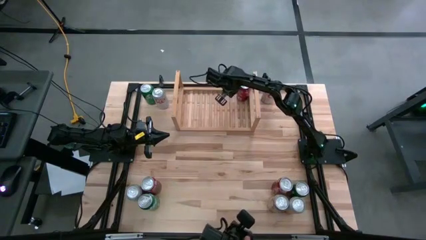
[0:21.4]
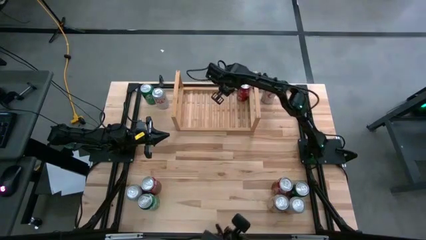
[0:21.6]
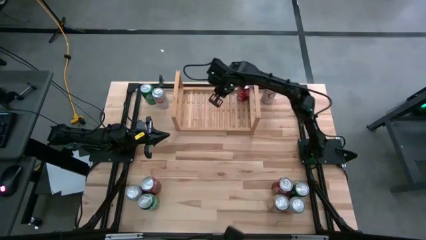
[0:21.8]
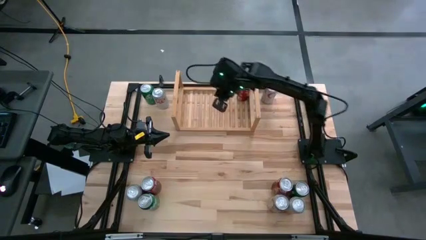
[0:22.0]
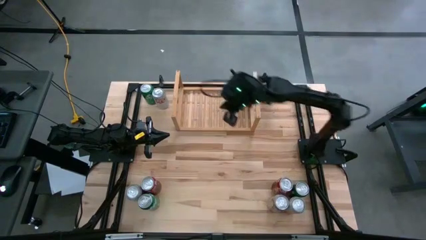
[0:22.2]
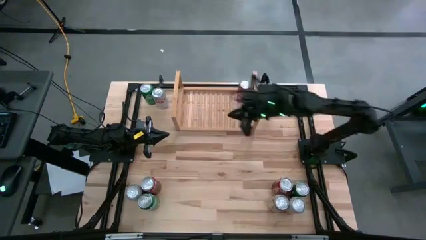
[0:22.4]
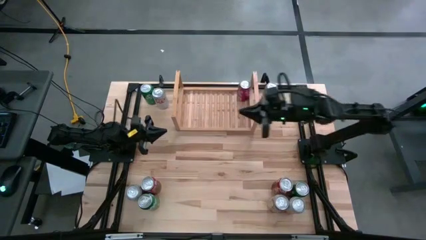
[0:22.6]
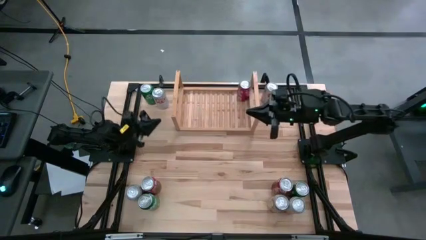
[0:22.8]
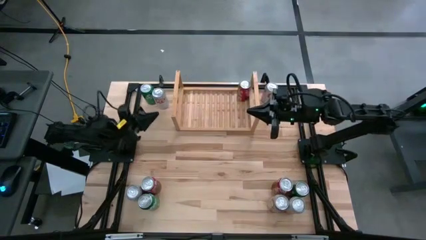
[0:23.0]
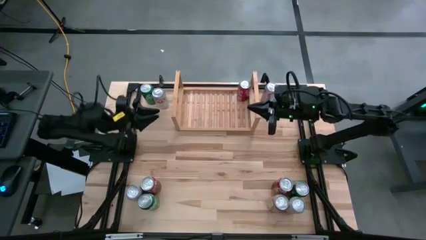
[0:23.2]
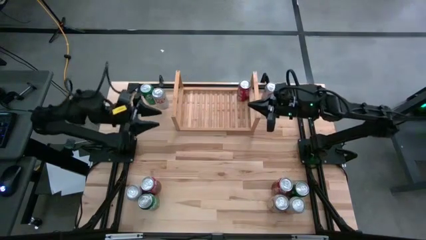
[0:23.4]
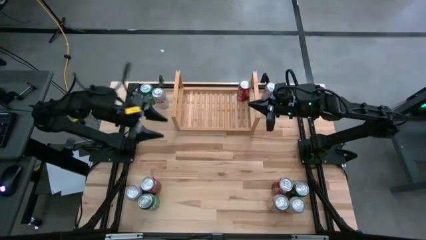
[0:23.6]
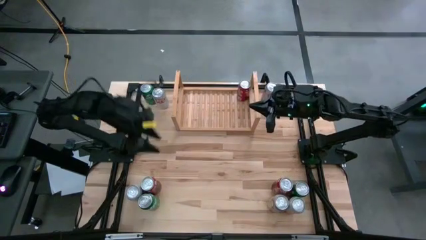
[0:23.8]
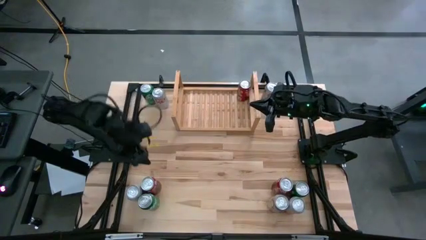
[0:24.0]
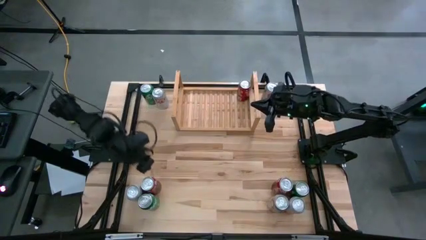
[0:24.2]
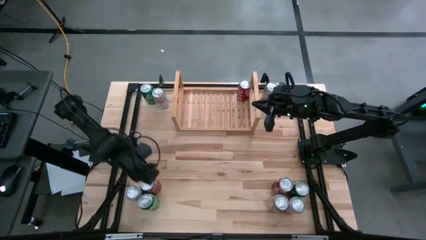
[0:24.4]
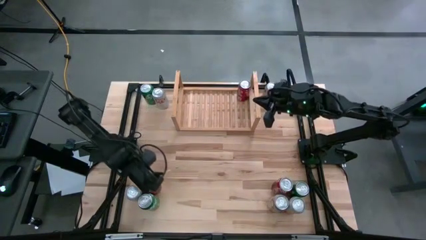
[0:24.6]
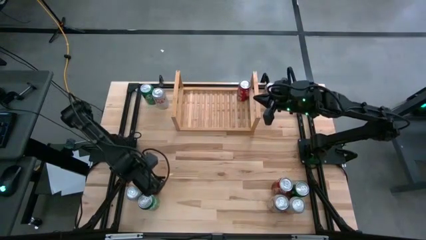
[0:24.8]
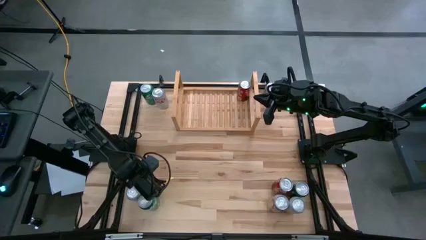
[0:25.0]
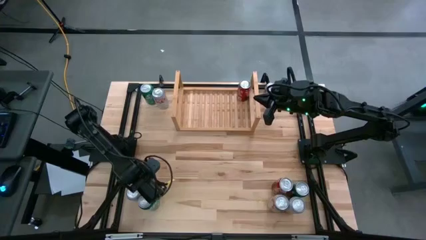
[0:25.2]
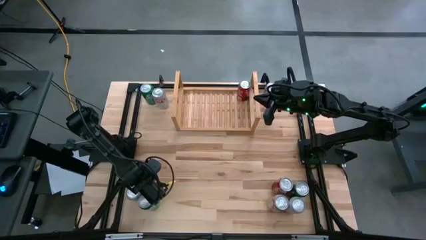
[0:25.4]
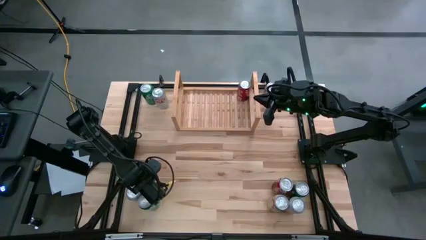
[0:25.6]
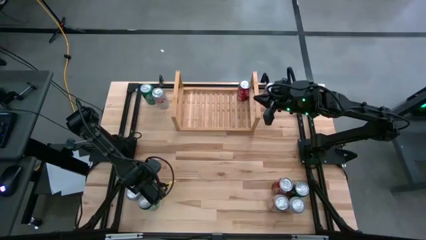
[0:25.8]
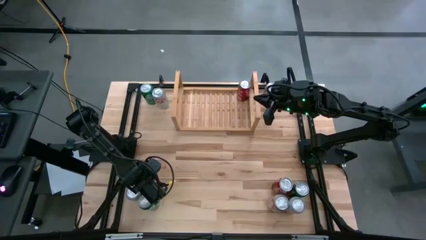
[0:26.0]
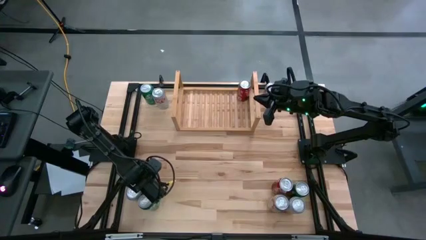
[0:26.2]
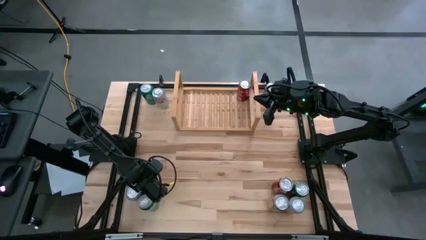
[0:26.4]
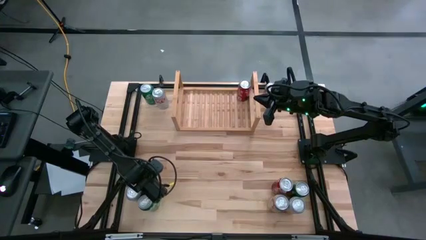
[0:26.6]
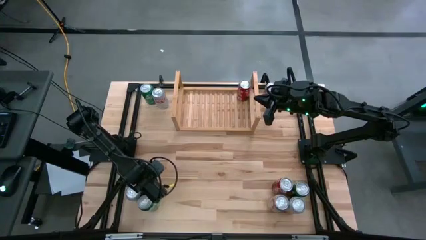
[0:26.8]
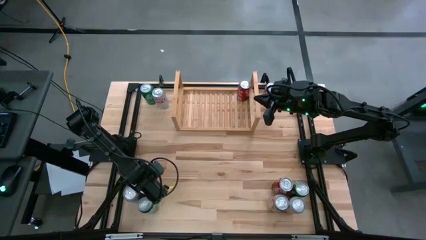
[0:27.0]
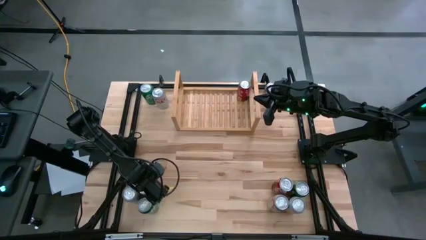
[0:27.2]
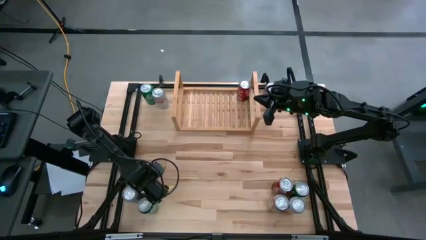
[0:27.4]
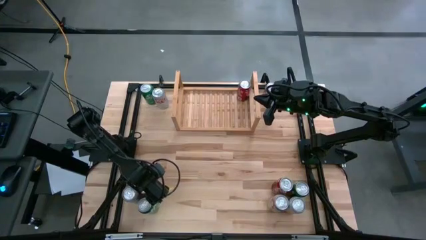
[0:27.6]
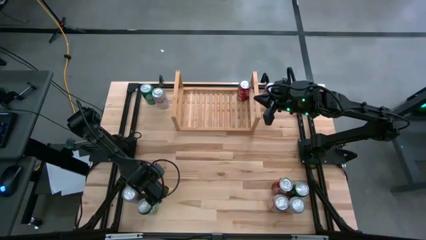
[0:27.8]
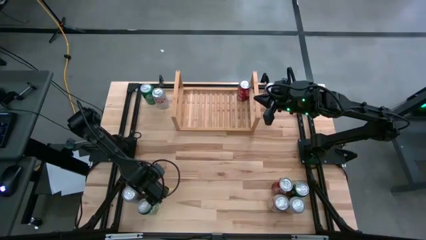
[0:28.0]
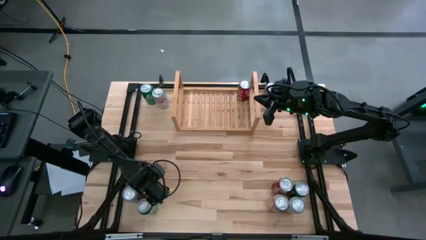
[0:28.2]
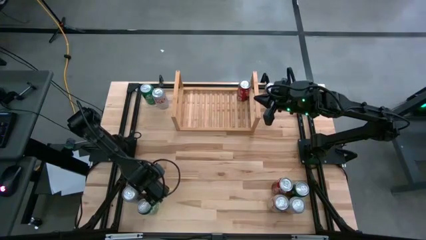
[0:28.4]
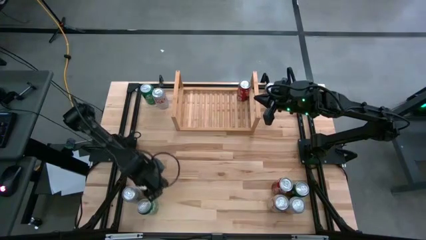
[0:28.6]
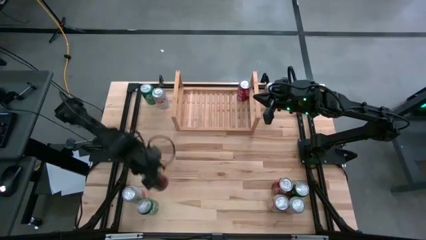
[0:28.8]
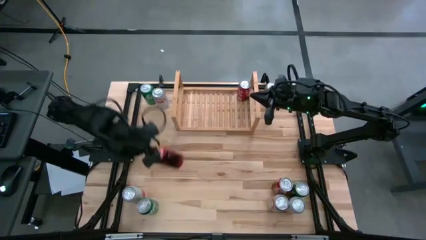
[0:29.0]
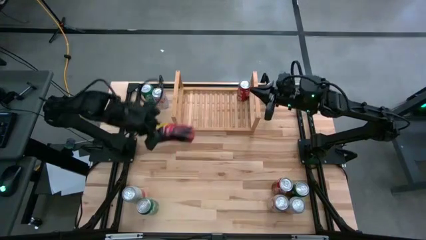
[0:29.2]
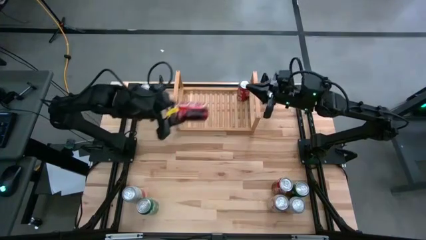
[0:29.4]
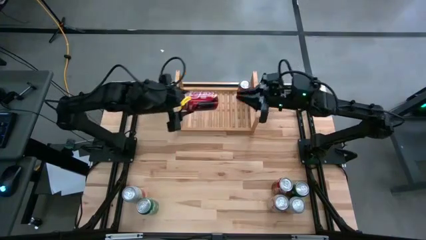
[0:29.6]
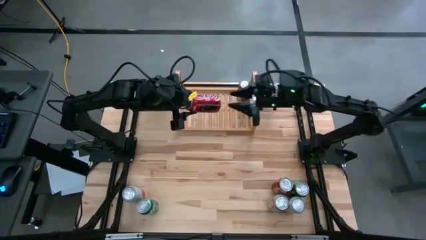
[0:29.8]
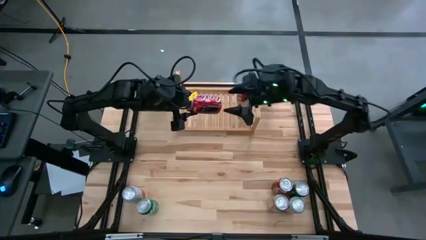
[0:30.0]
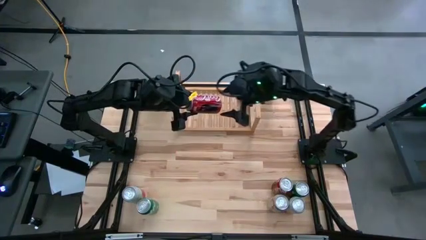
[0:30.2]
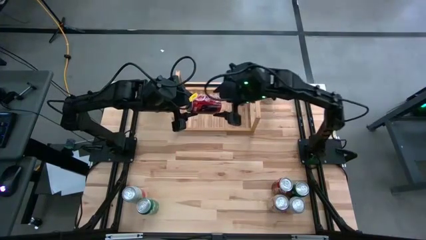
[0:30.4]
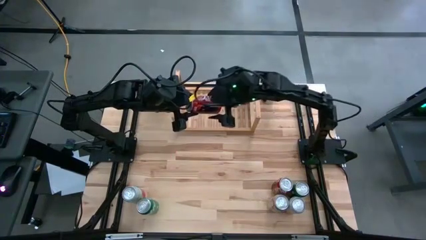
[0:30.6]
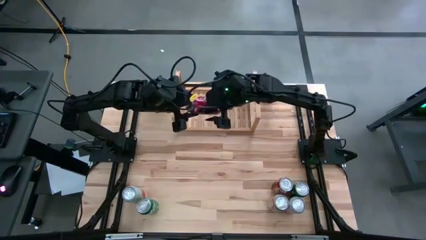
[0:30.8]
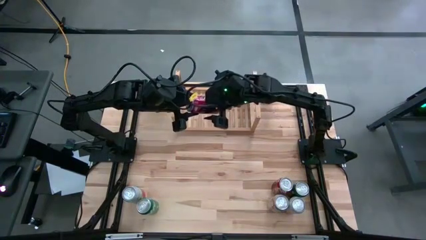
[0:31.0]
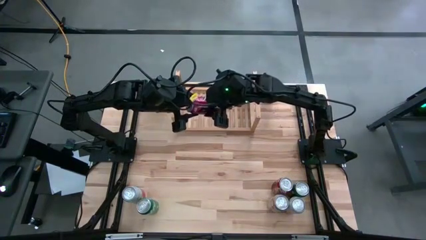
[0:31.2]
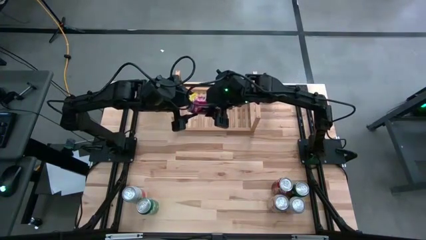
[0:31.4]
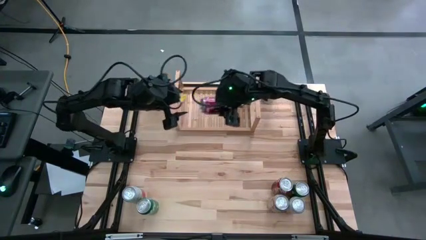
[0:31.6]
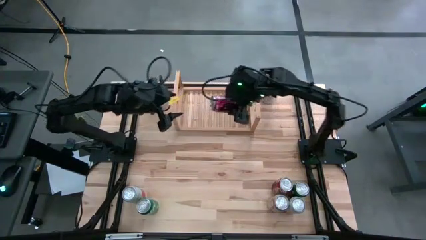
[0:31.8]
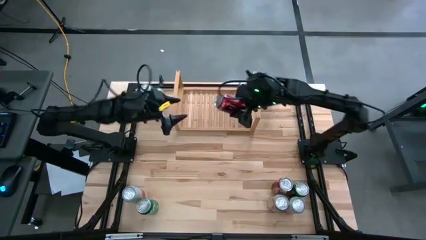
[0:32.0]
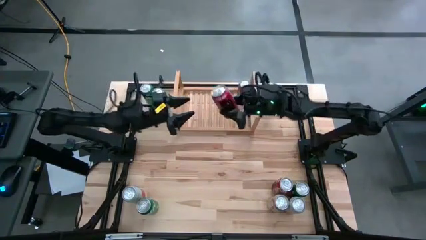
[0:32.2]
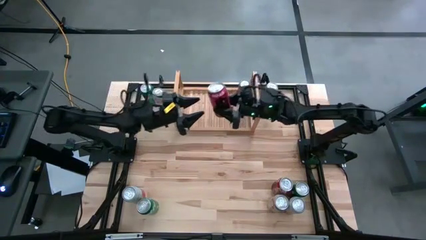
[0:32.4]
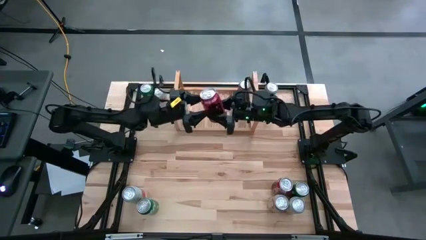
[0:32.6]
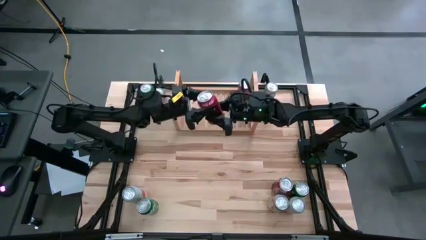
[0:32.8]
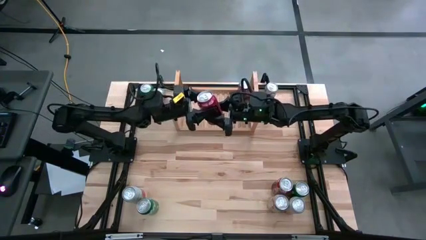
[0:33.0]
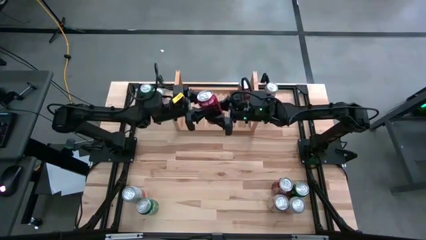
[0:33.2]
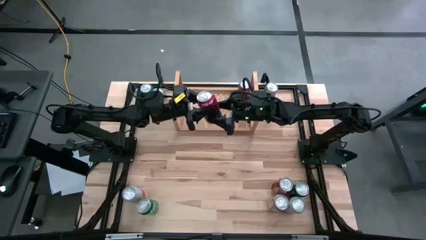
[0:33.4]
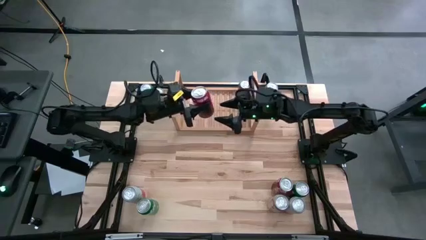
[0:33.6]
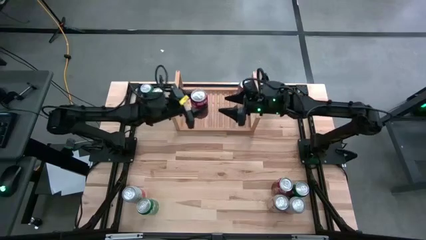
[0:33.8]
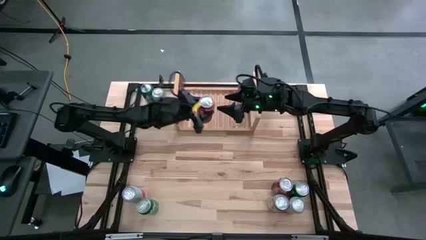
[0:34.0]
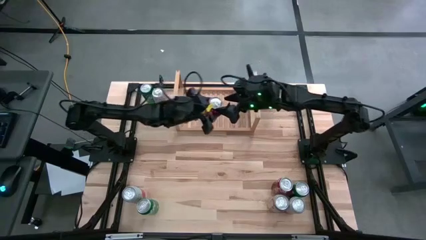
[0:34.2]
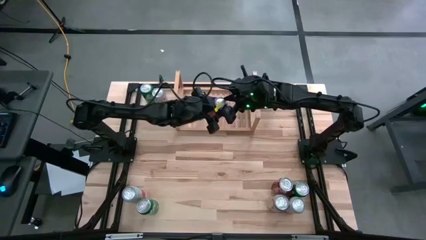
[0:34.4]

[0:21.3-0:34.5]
Task: Place canned beverage on shelf
Put the left red soda can aligned with the other red soda can on the shelf
